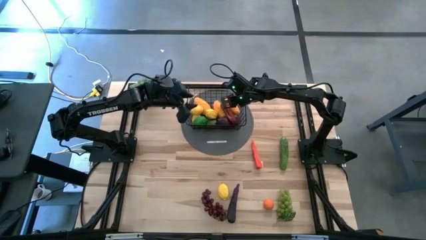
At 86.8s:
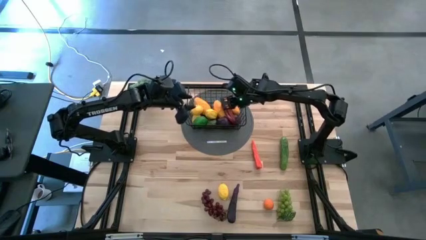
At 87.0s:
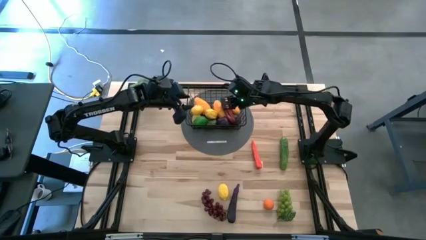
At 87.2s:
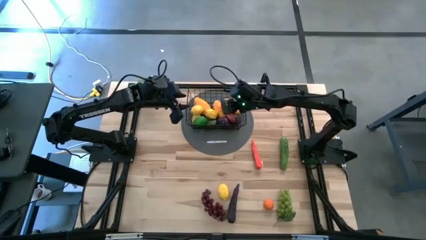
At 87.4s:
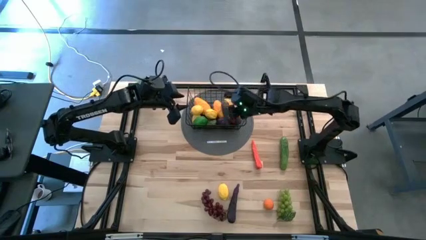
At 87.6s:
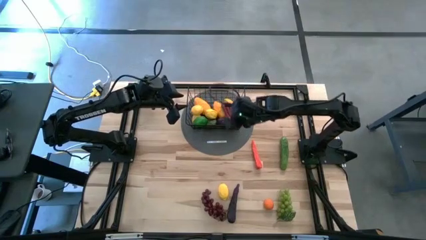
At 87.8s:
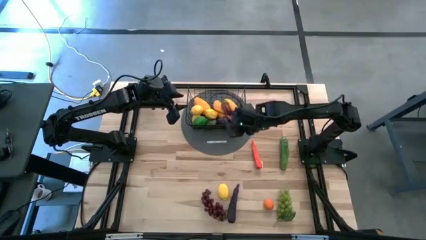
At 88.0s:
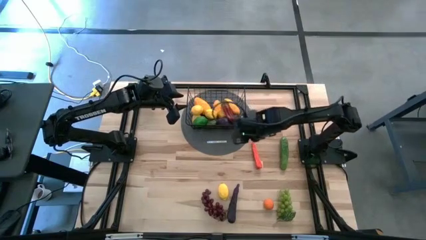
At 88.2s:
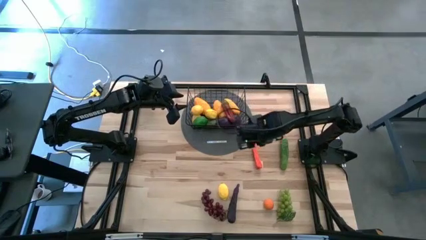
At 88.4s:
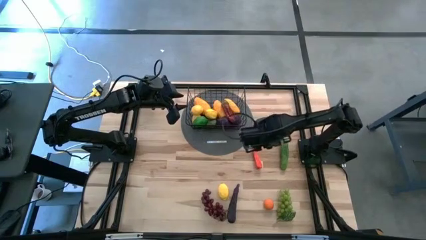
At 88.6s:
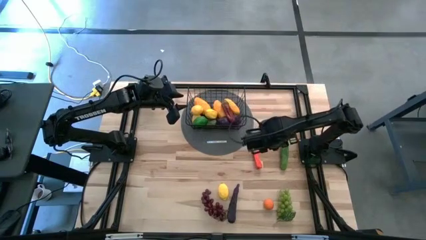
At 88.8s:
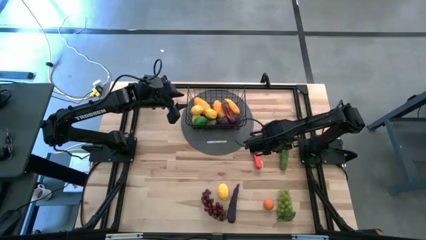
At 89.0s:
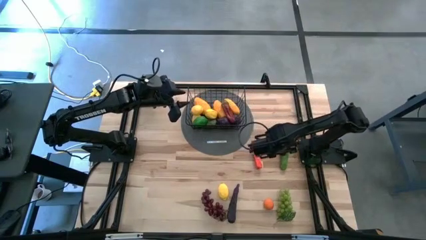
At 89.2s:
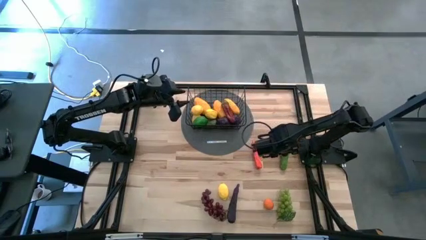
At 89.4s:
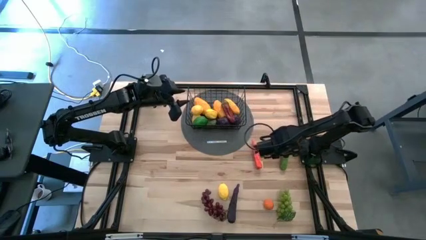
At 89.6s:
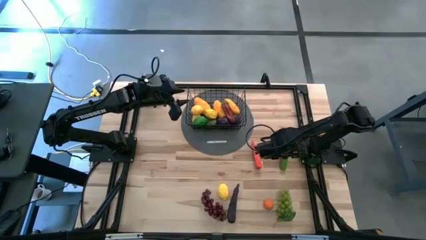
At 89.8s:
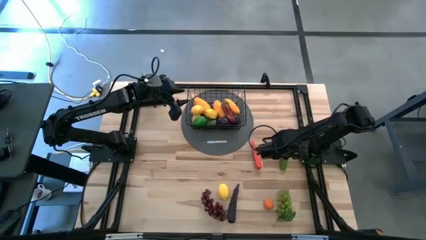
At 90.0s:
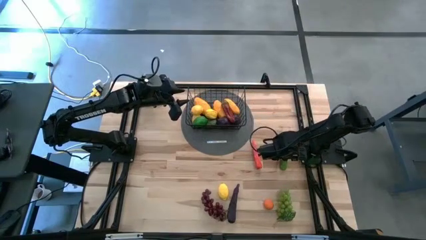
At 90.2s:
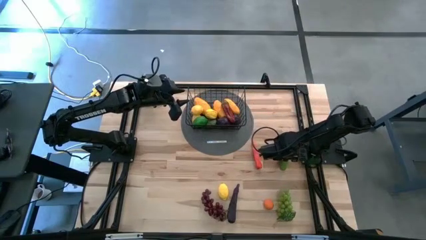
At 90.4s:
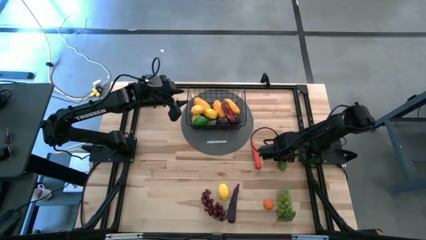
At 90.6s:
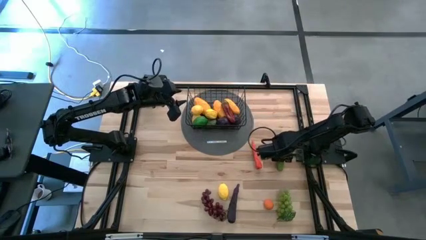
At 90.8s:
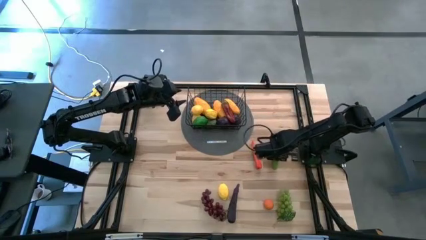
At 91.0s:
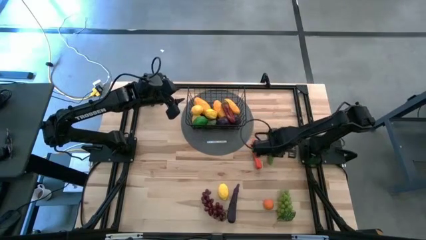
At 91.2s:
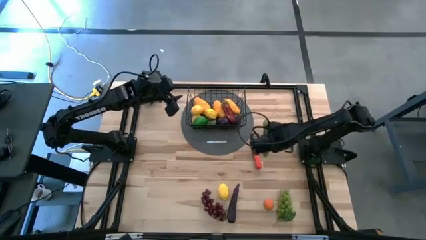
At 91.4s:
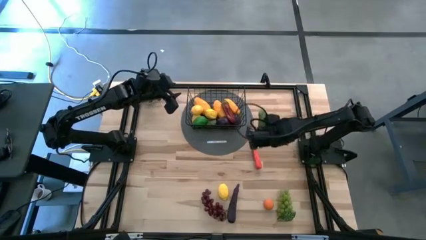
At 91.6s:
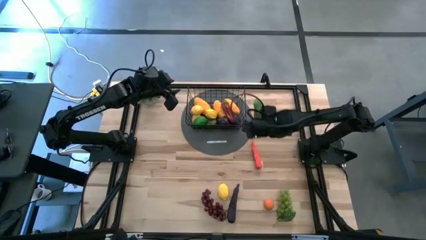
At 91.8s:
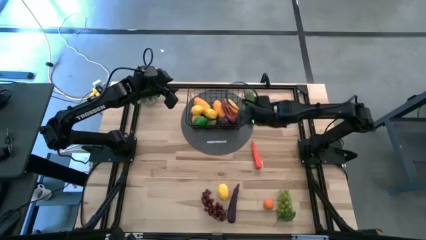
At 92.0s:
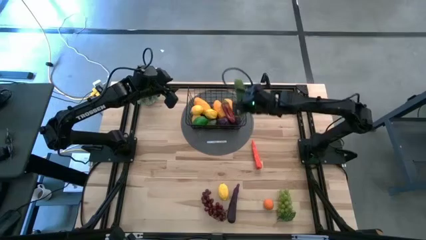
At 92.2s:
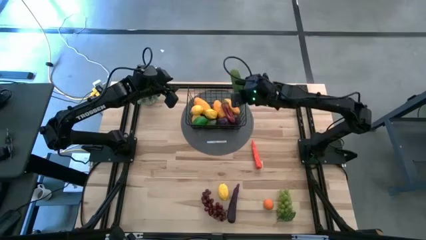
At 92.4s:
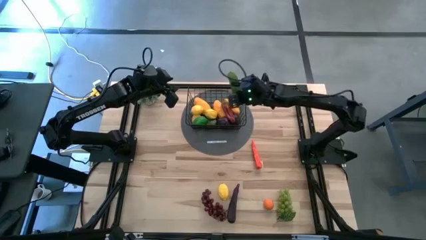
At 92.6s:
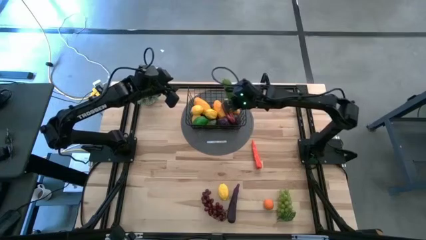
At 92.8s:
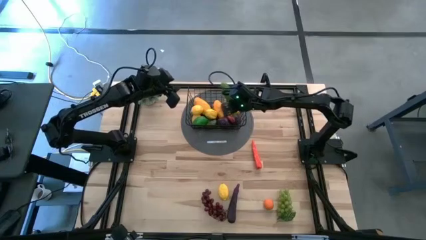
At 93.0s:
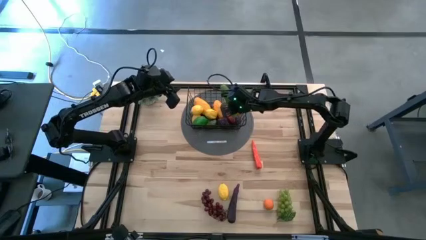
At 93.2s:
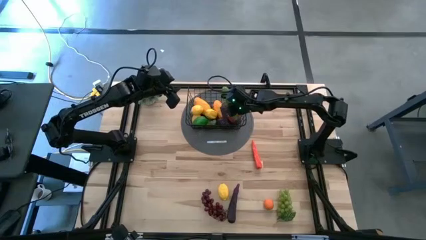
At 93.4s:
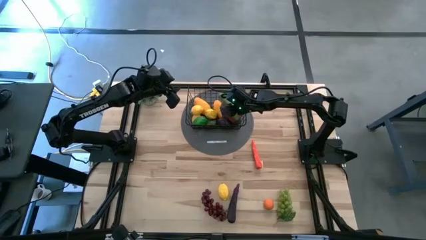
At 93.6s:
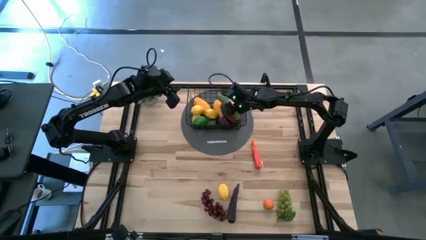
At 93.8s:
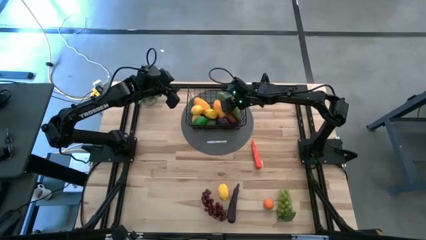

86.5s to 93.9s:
Task: Build produce basket
Put the green cucumber into the black wire basket

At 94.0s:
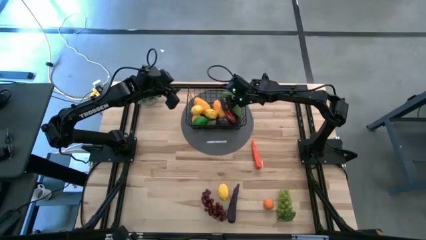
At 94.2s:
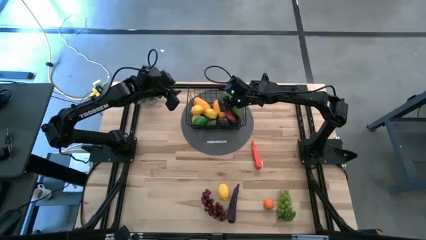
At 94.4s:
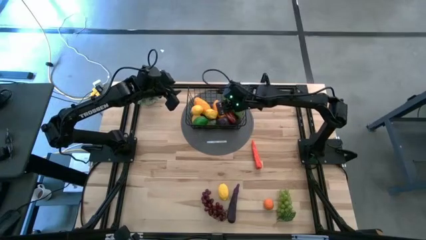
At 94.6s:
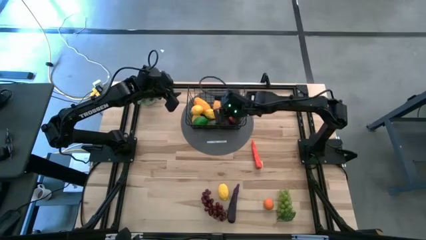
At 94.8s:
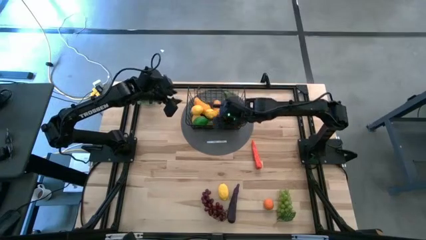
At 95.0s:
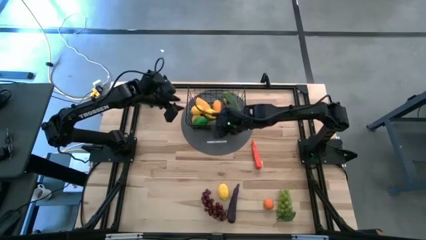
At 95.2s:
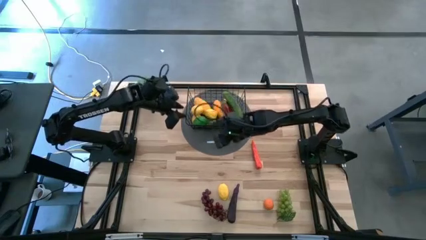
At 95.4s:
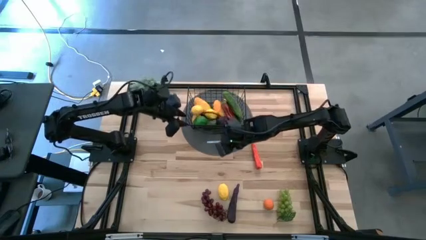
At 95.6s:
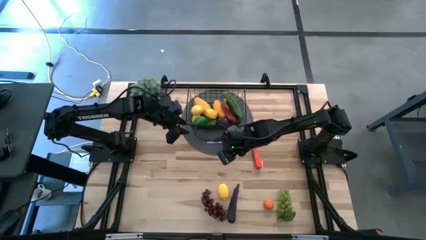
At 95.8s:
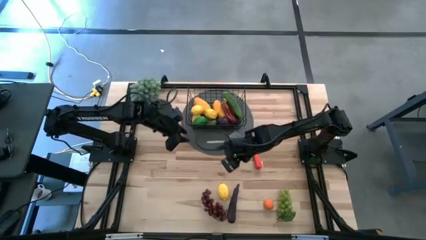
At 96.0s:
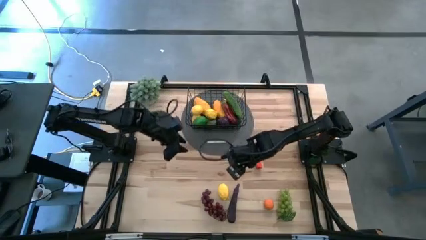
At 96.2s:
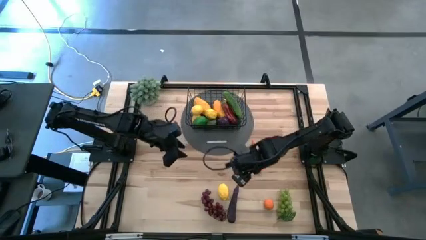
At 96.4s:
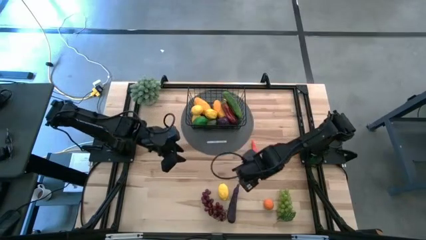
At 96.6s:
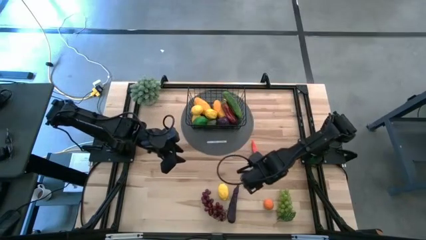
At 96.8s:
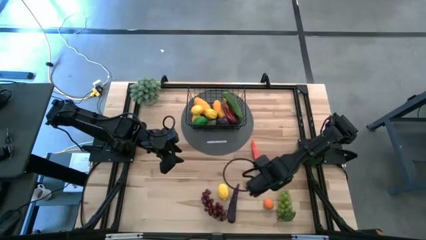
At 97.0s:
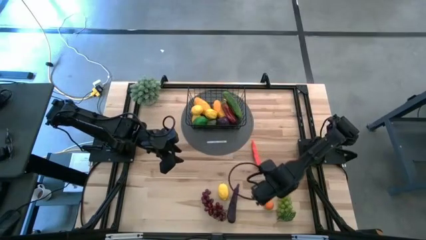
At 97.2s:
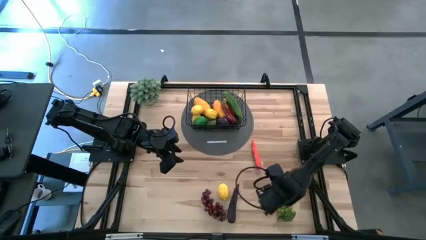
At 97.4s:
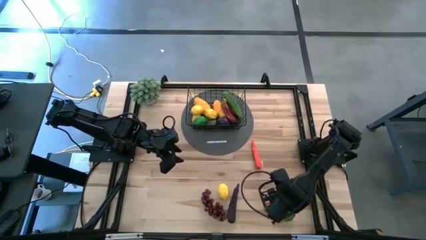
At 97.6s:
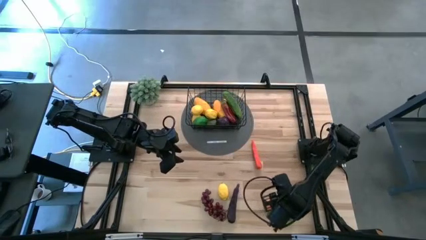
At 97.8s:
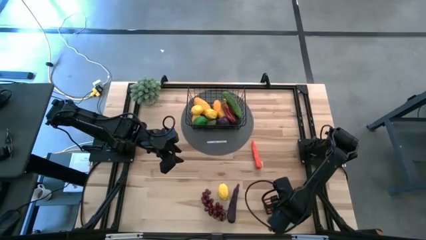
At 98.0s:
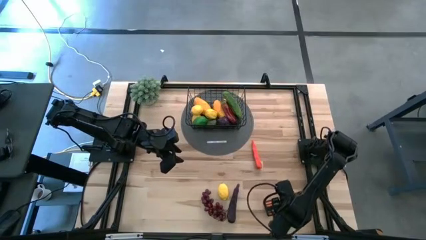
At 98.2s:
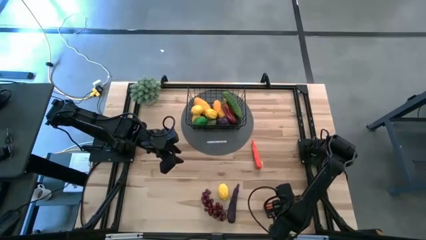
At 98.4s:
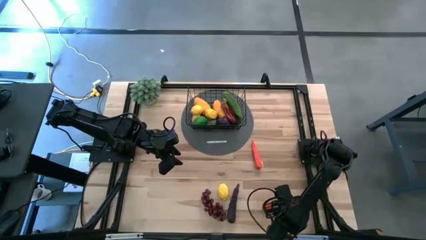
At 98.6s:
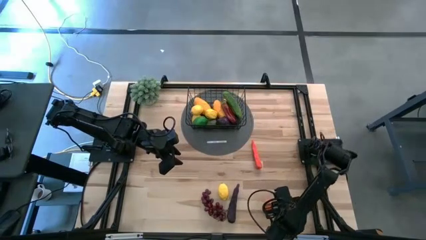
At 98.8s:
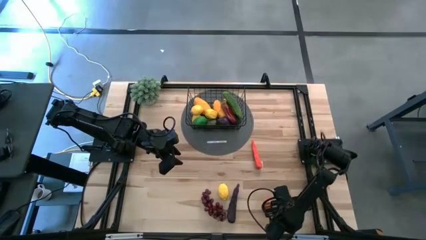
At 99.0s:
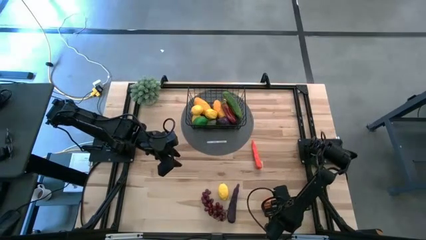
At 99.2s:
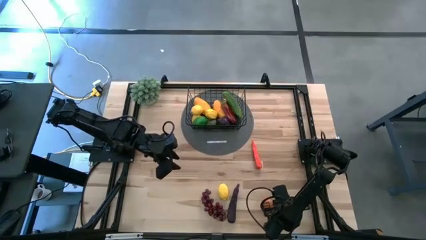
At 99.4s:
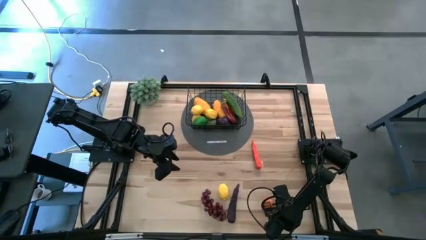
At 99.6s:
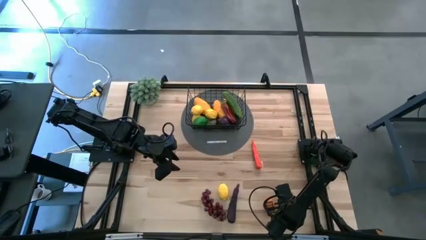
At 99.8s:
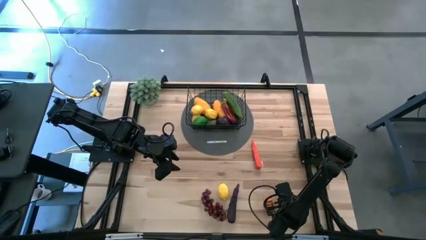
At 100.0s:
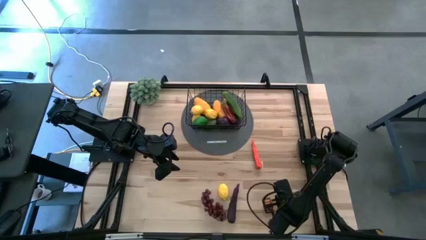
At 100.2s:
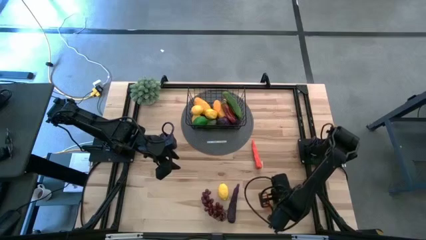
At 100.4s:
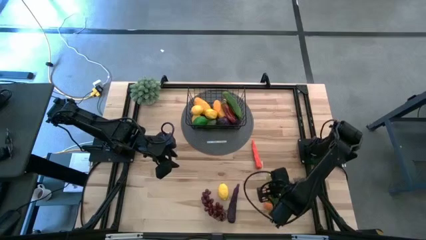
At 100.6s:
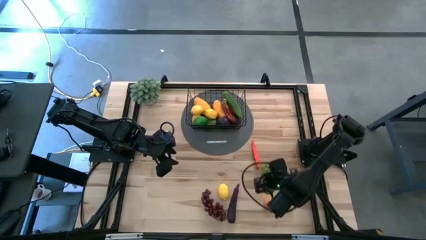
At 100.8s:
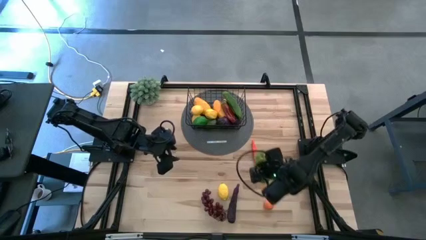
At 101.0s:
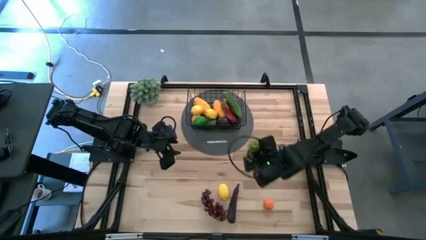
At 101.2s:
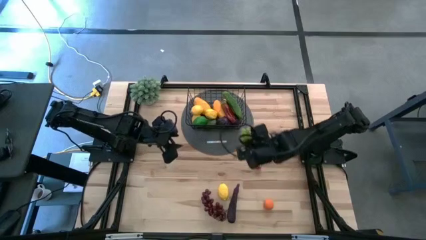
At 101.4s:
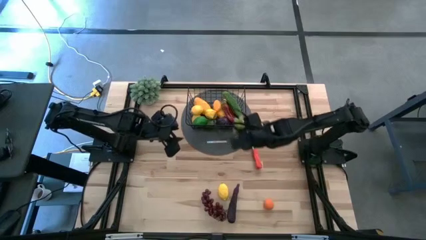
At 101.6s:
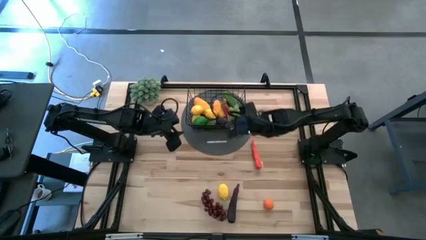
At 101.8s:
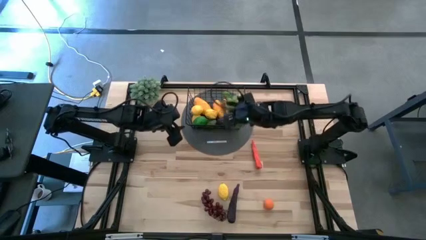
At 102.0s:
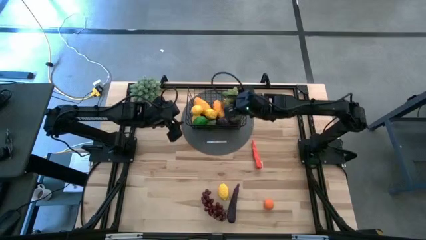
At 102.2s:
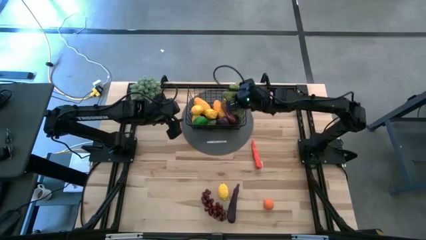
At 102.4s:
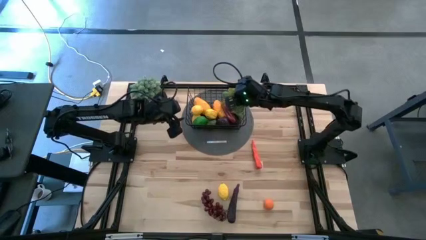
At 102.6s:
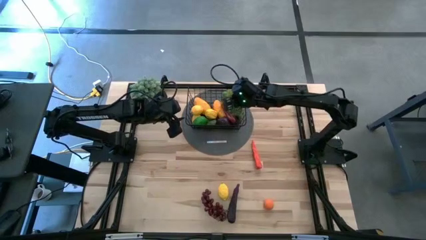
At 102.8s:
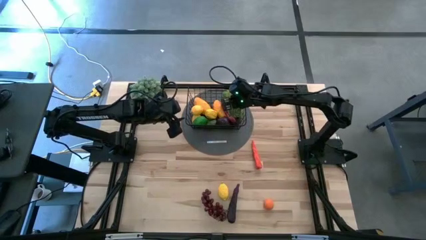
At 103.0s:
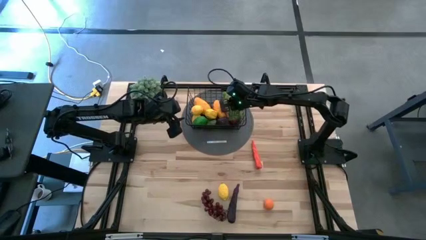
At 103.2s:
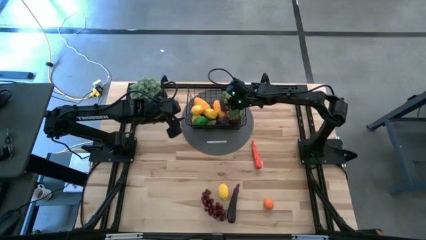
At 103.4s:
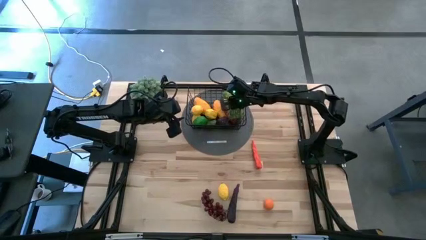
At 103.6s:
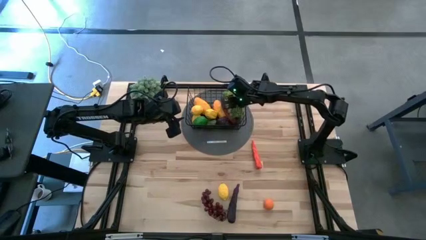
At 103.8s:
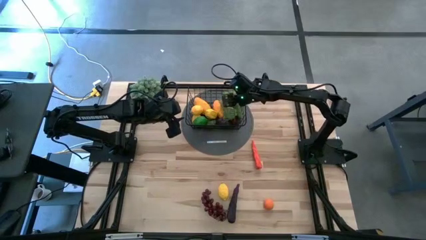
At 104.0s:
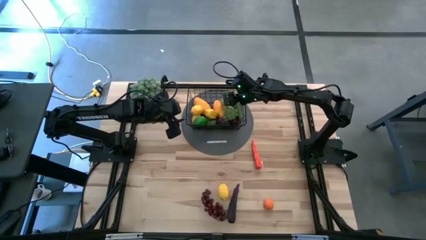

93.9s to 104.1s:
Put the green grapes into the black wire basket
